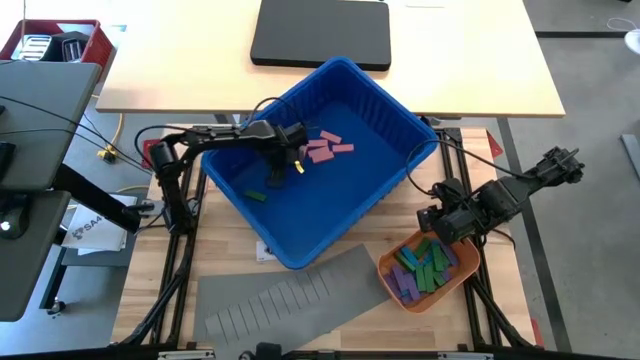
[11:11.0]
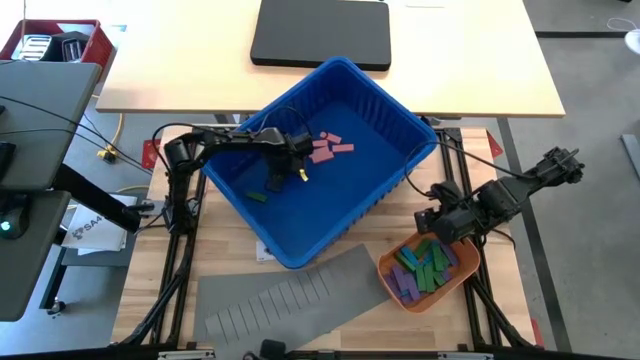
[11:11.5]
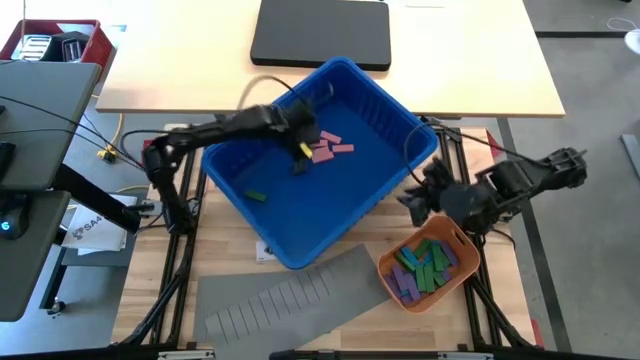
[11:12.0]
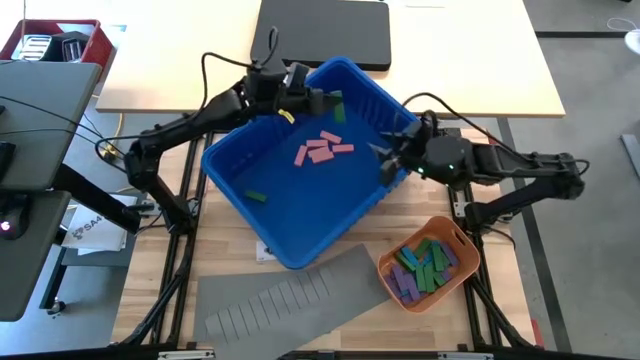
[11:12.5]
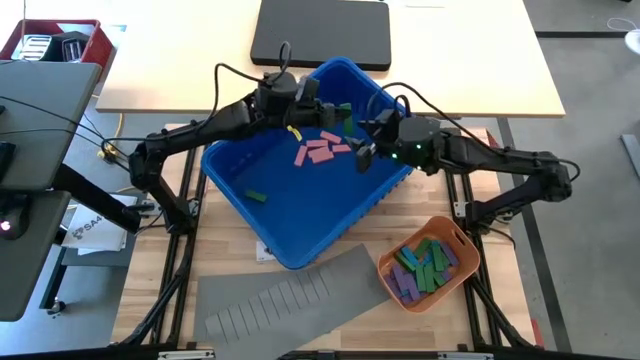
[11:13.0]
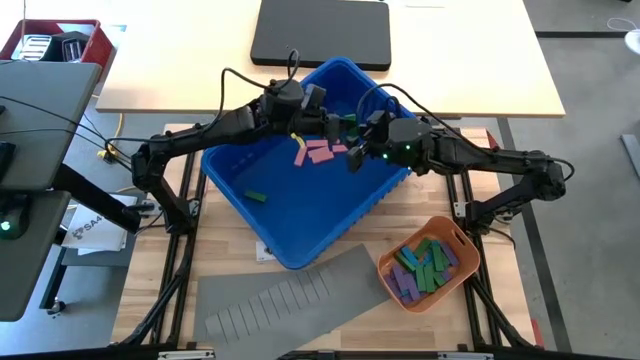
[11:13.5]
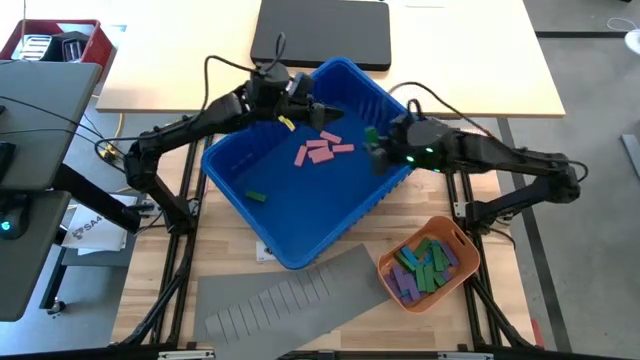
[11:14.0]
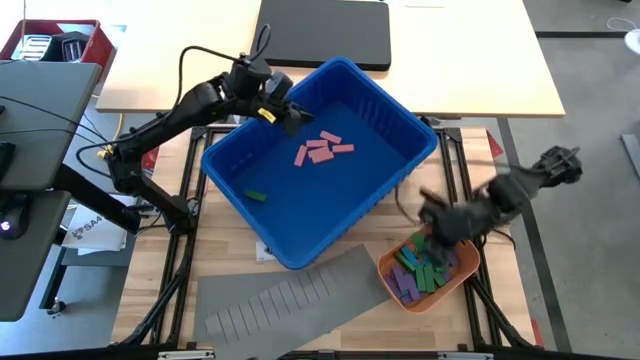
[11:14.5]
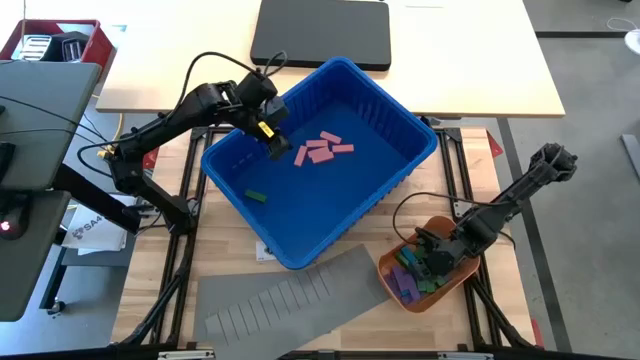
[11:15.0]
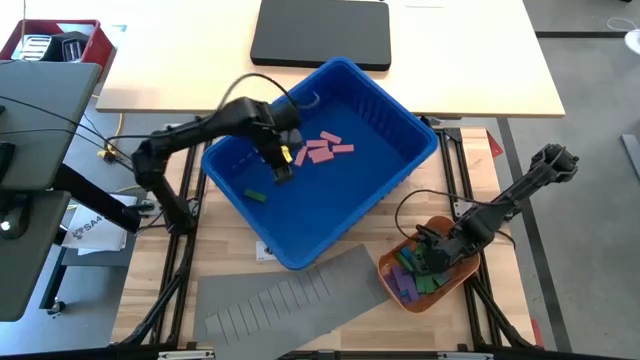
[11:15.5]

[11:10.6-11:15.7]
Task: Sort blocks
Put the green block into the orange bin

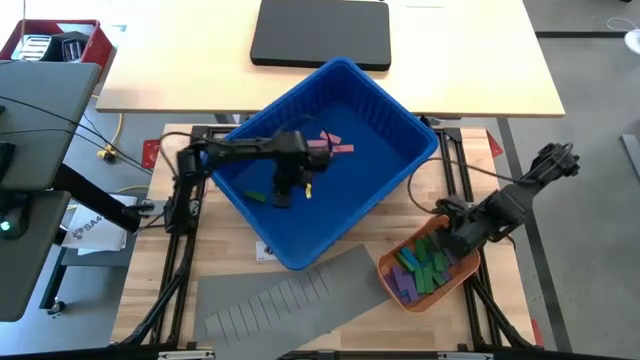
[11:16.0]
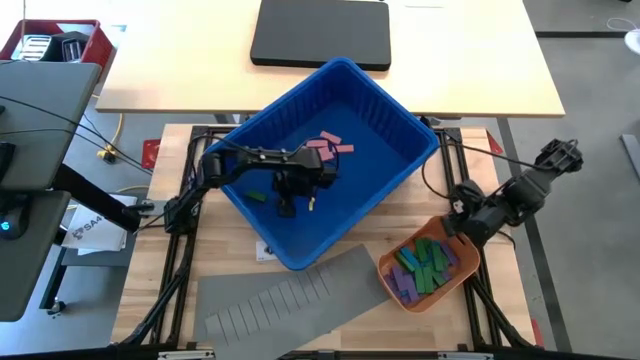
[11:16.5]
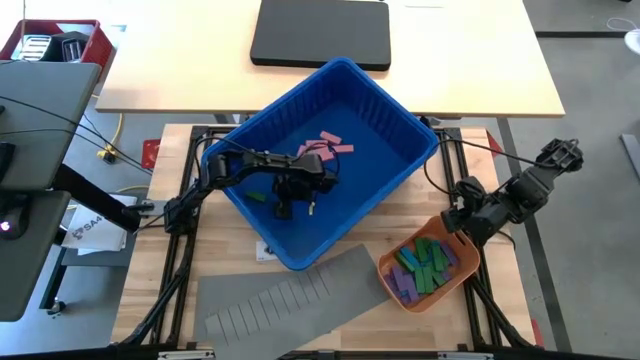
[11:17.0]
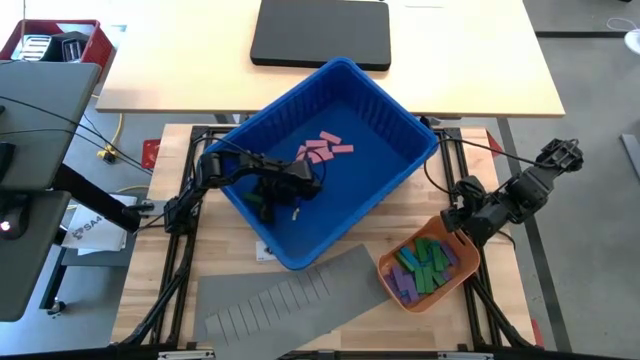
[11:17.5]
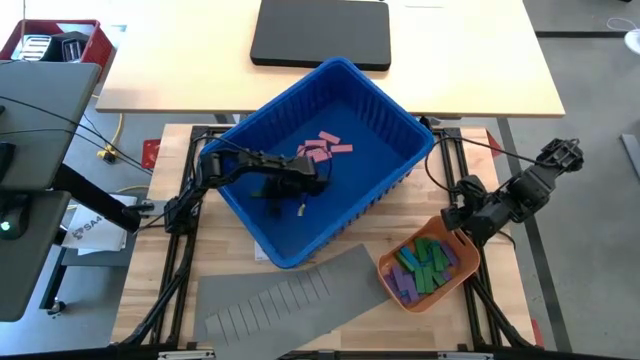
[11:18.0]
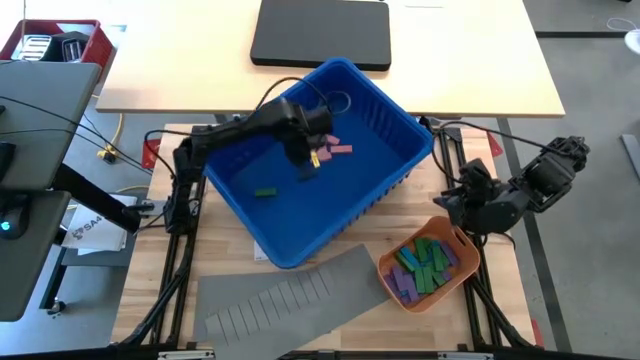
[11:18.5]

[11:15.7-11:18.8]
Put the green block into the orange bin

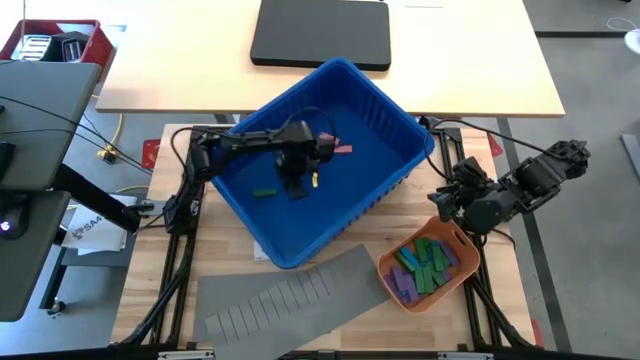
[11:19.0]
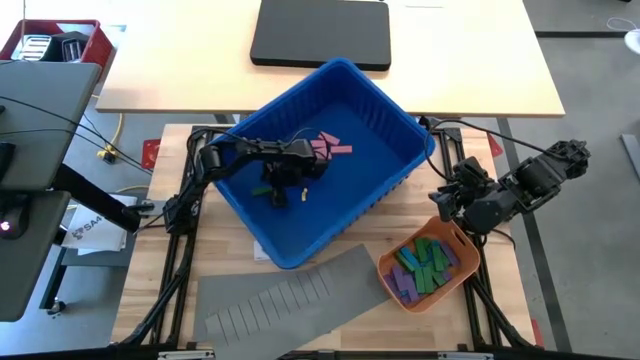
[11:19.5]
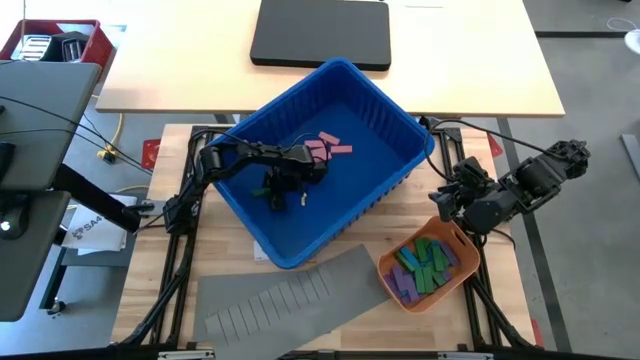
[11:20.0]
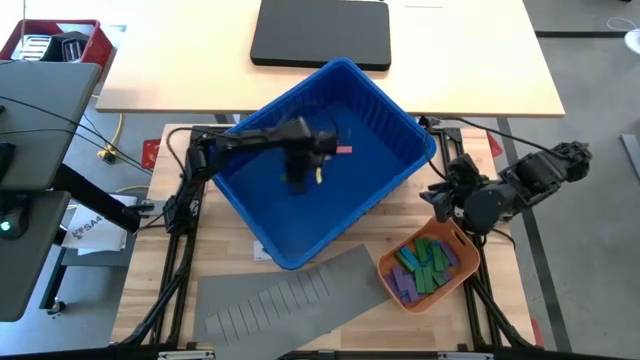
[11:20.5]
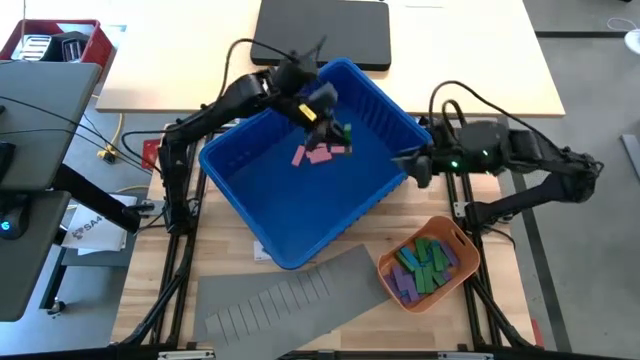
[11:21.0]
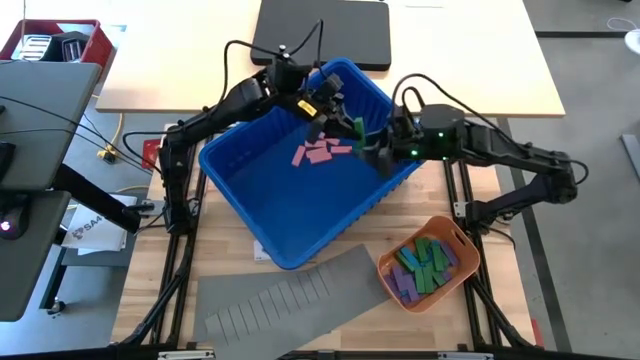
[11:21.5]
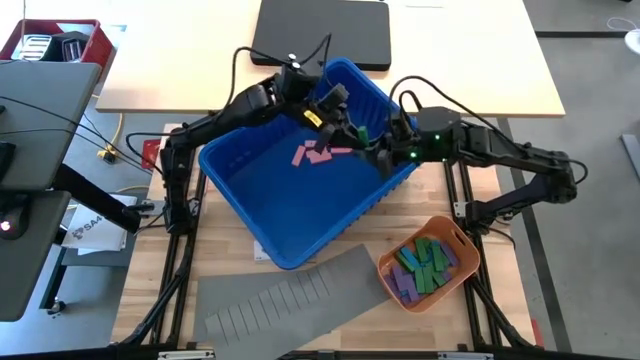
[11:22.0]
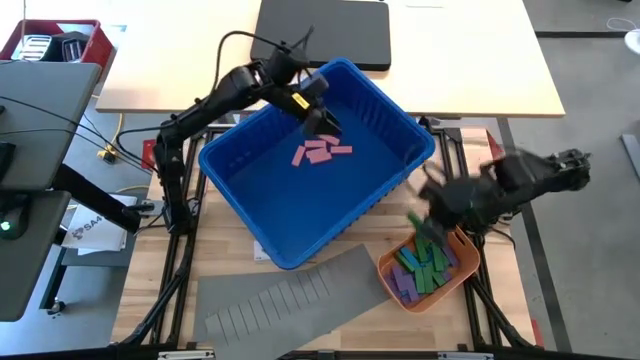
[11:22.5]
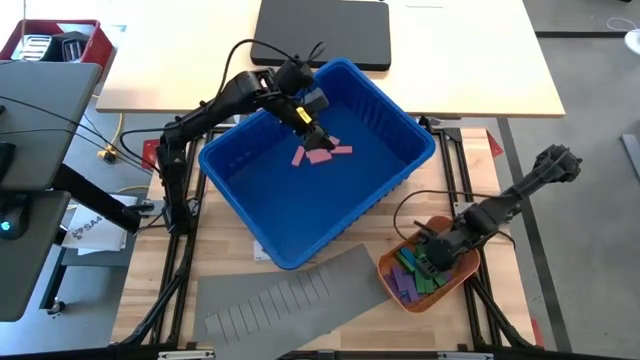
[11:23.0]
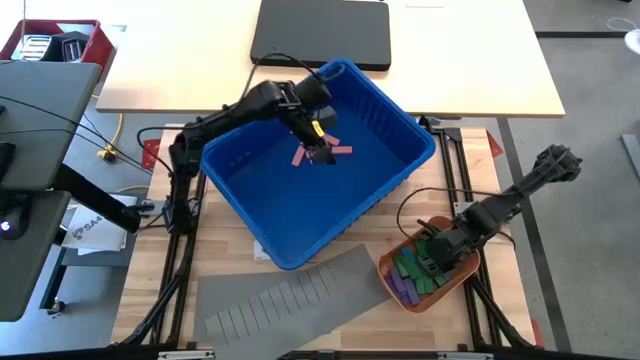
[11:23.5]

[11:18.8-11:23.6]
Put the green block into the orange bin

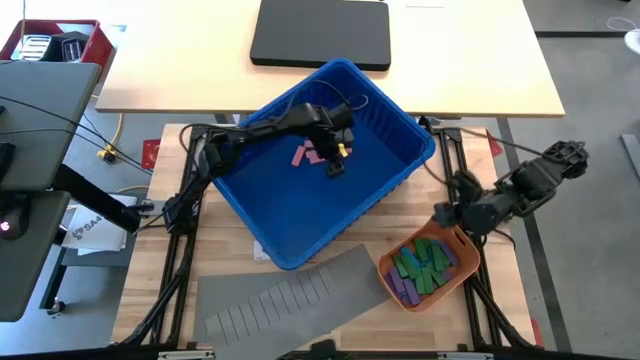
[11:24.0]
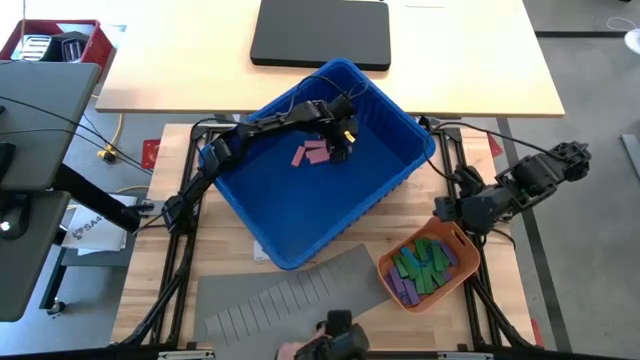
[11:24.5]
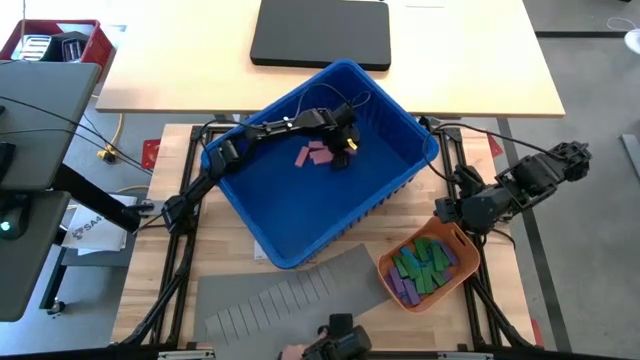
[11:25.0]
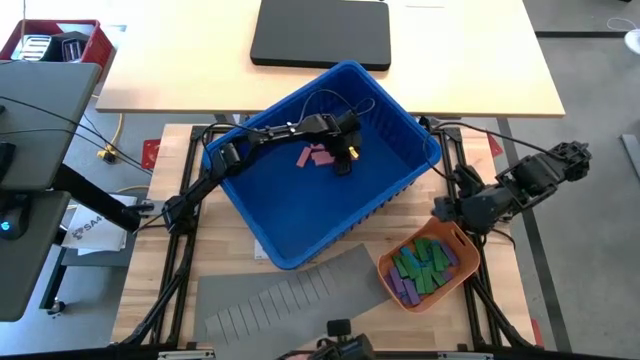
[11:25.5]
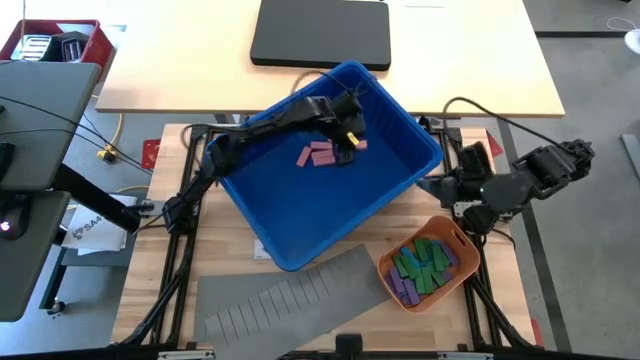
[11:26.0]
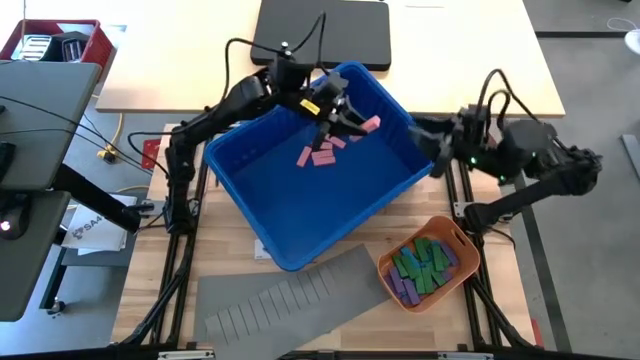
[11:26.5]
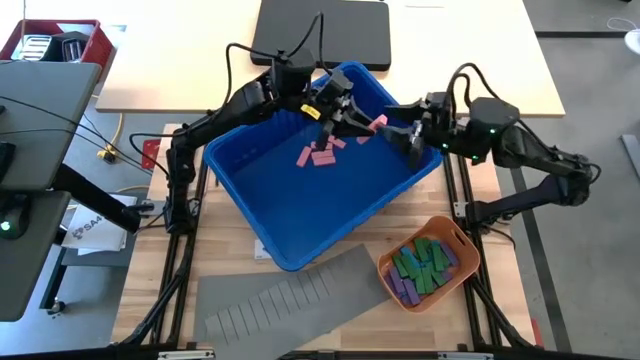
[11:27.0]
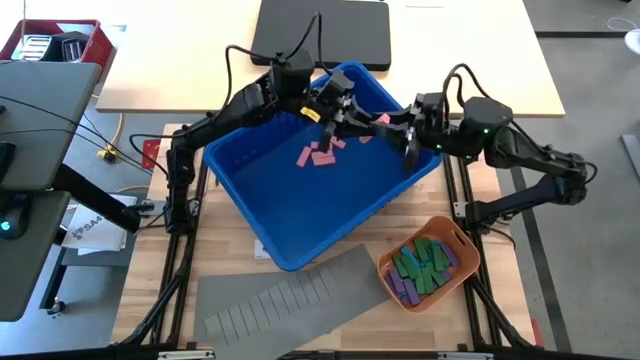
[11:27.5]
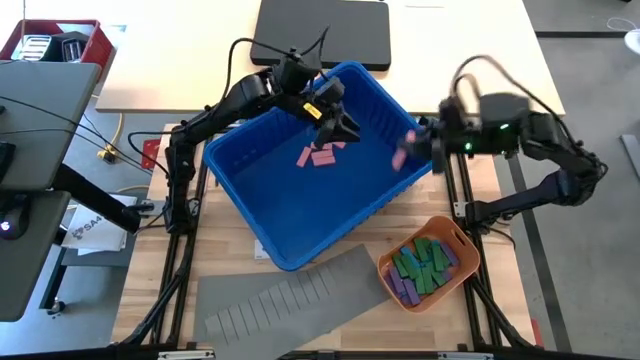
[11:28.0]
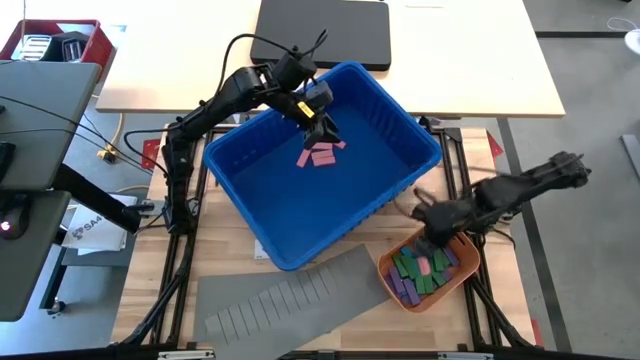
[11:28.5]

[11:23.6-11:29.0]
Put the pink block into the orange bin

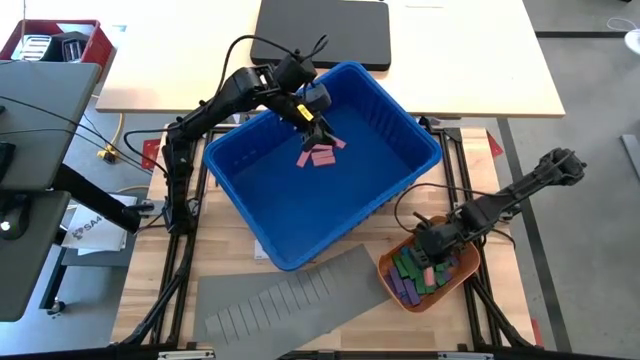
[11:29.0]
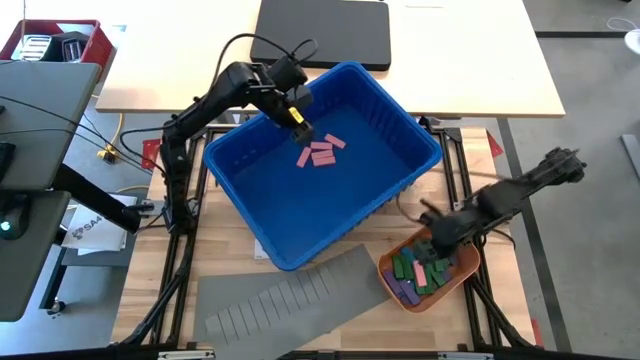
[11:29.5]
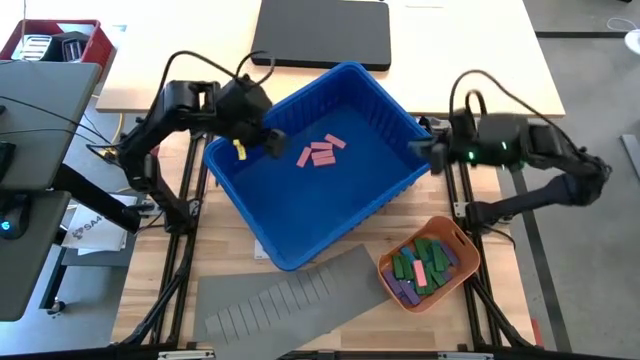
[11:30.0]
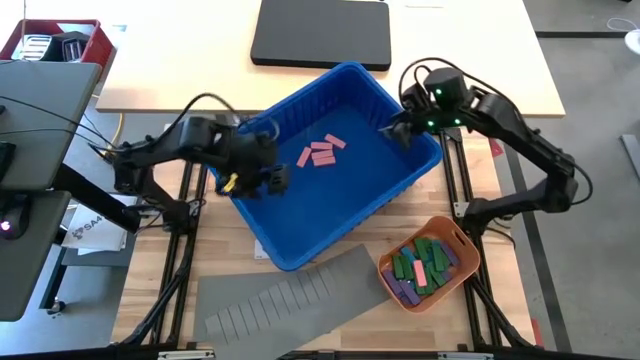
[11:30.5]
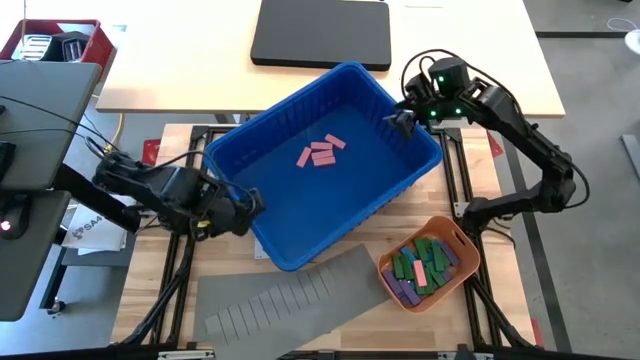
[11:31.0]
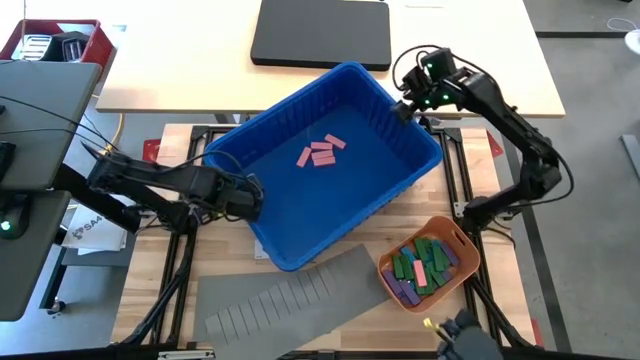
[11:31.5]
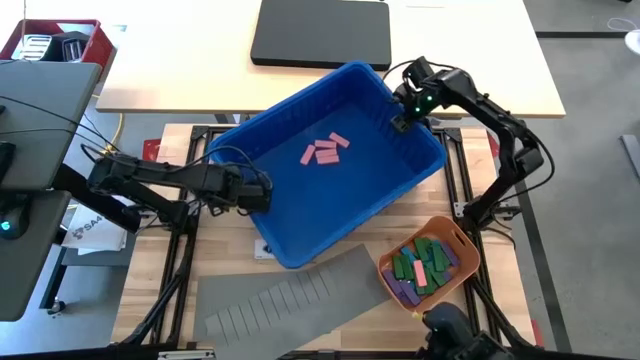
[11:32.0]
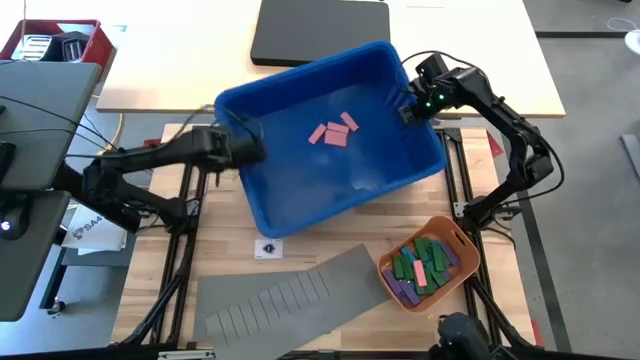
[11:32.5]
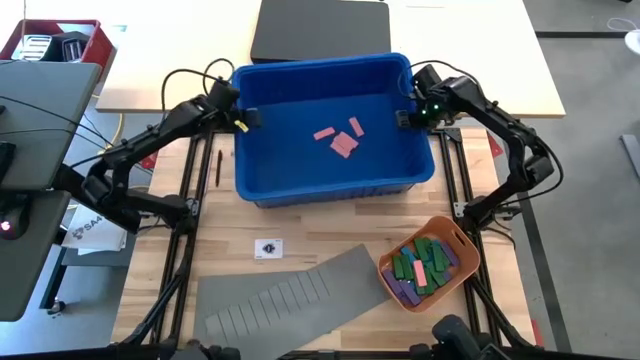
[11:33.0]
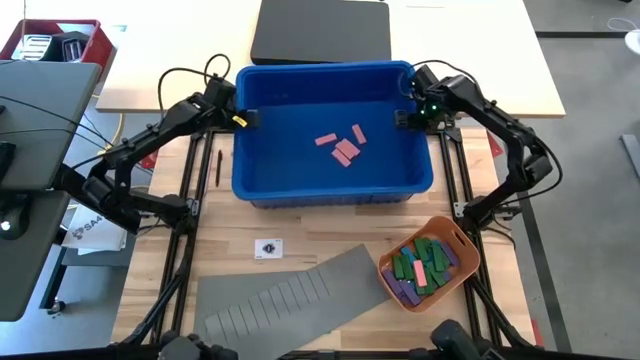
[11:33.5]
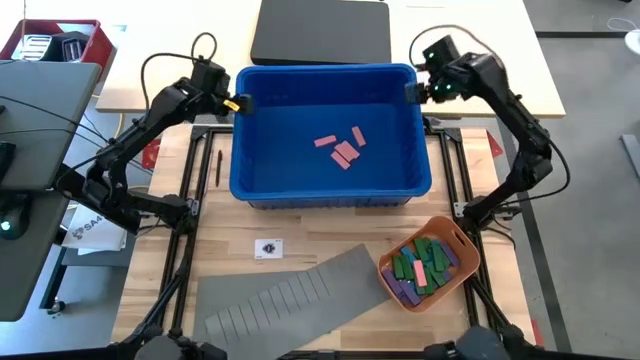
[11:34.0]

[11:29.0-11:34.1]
Adjust the blue bin
